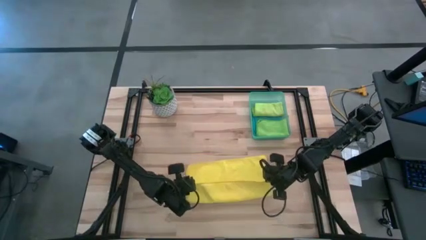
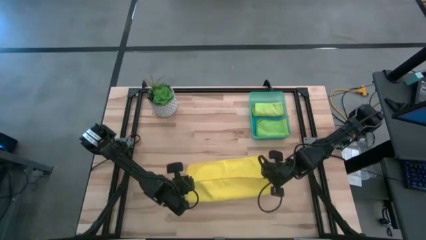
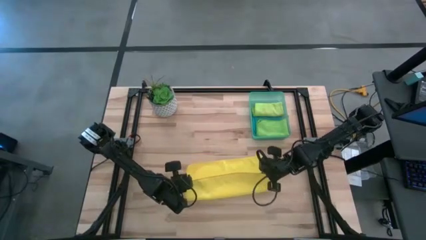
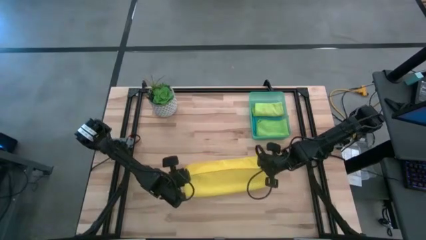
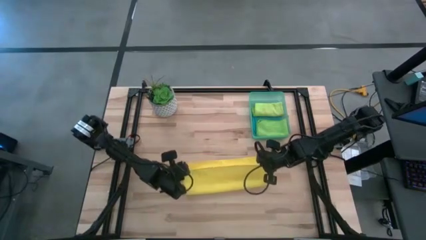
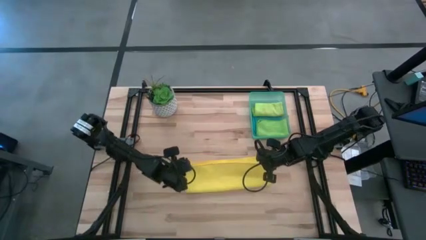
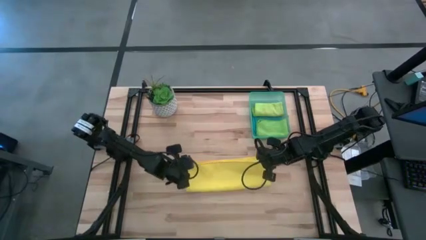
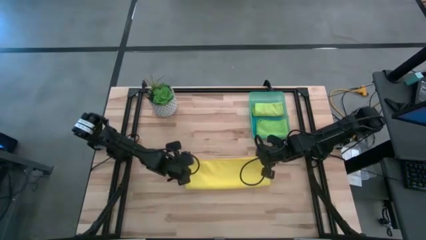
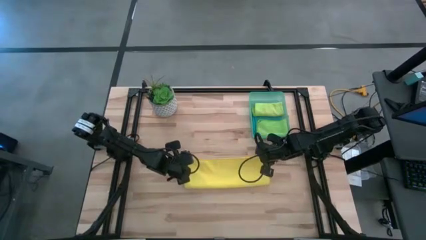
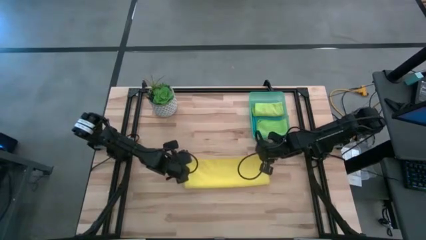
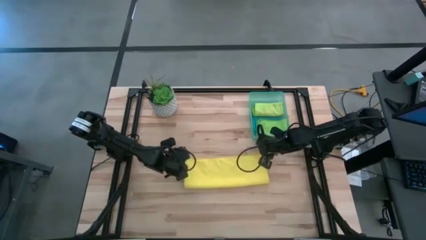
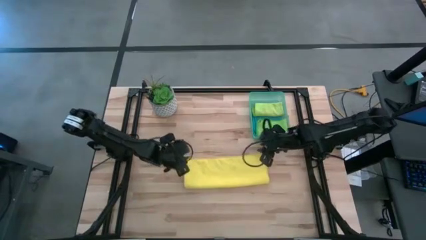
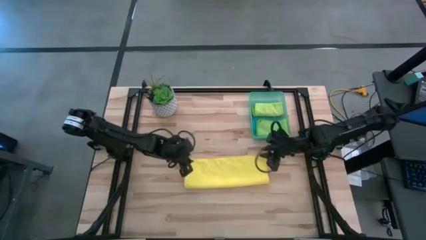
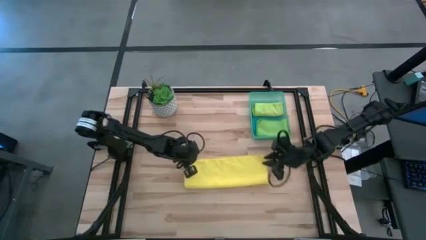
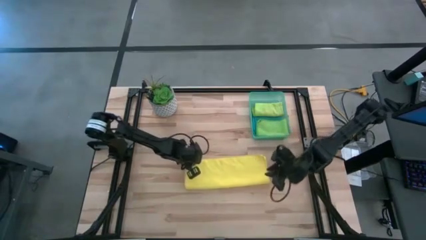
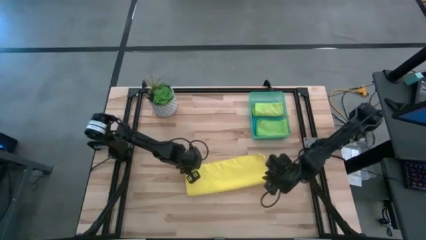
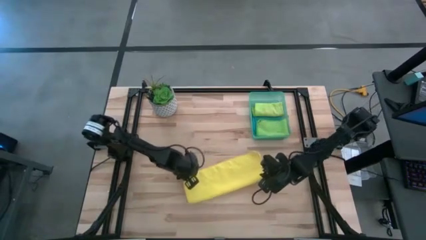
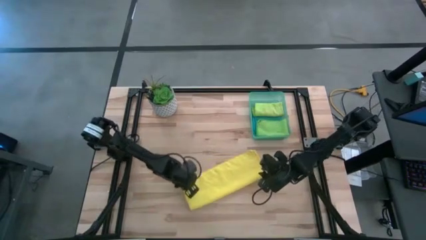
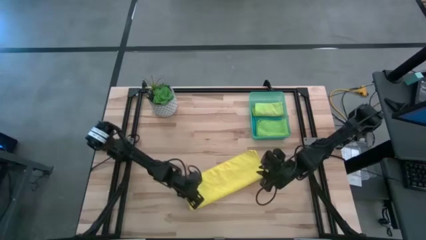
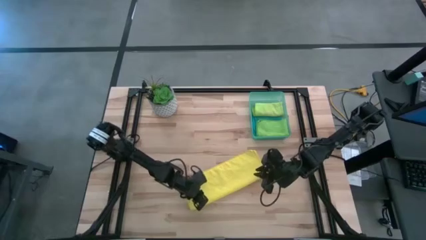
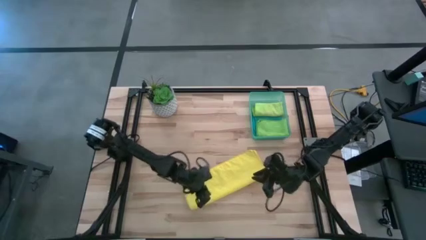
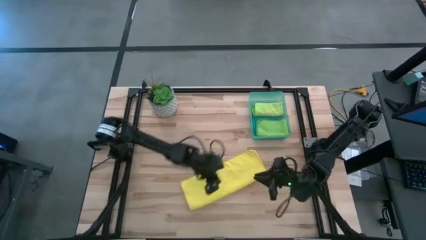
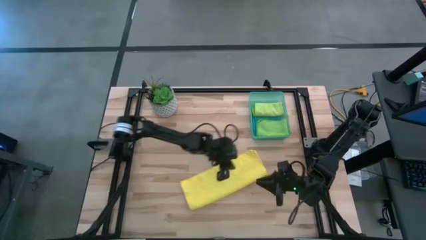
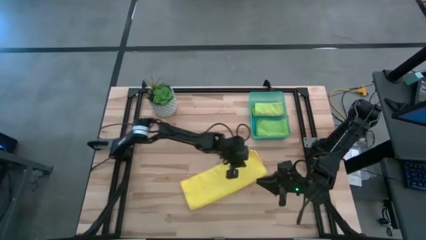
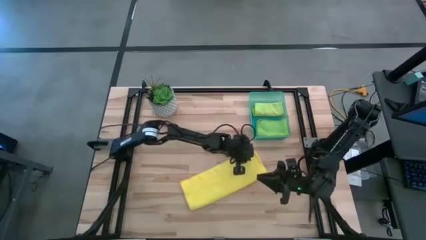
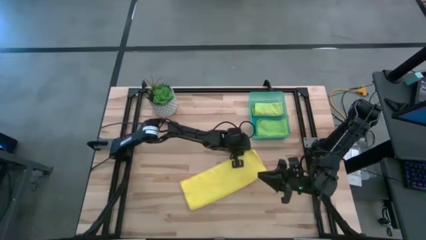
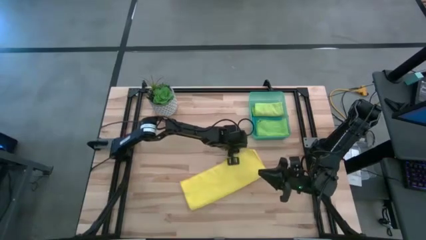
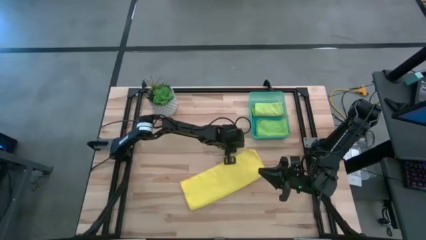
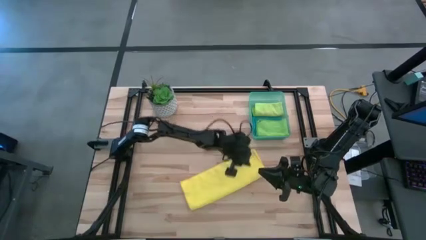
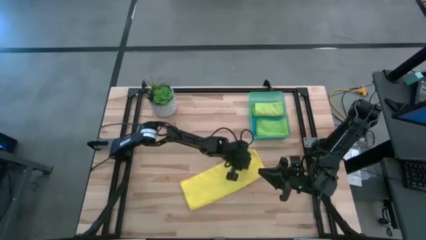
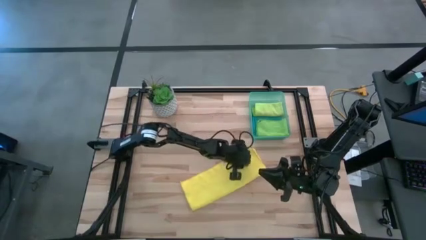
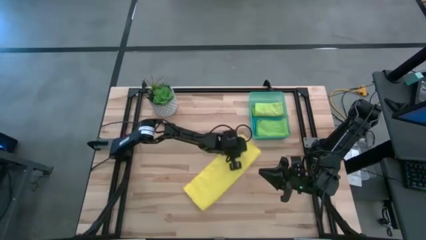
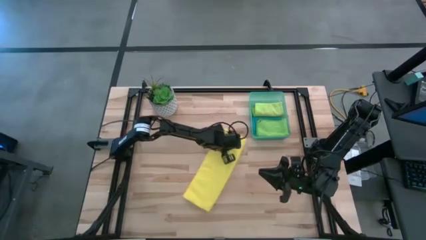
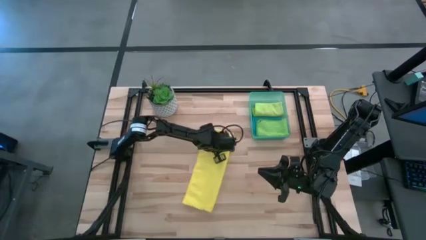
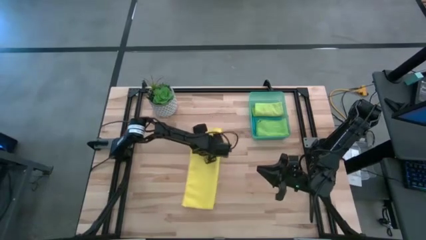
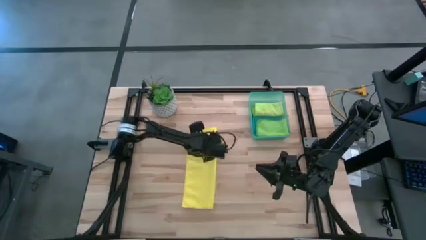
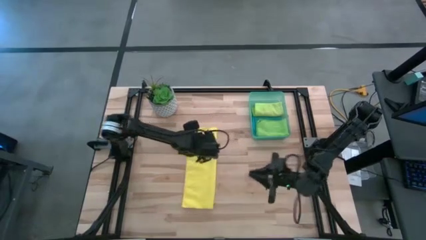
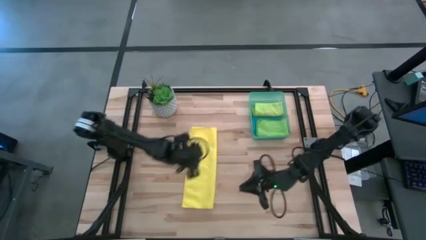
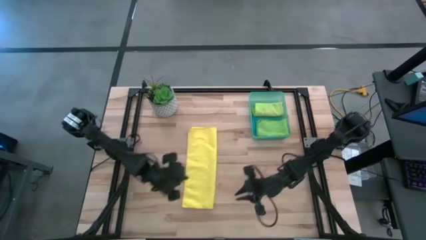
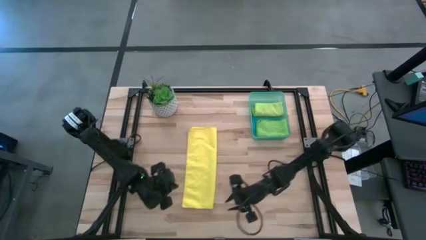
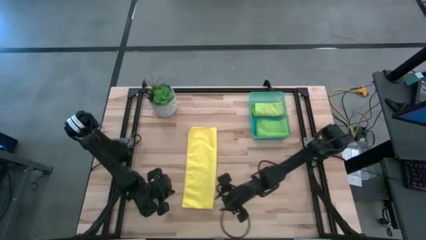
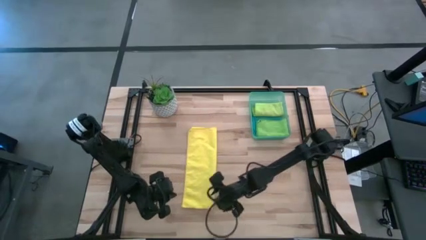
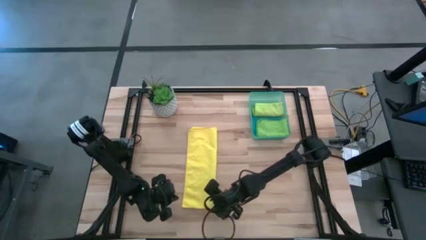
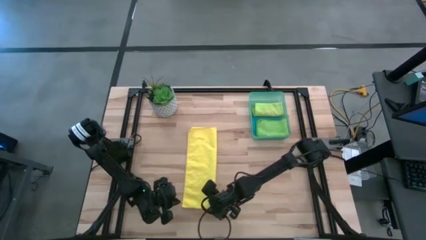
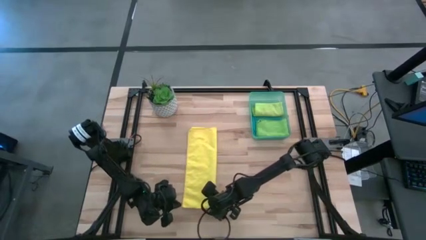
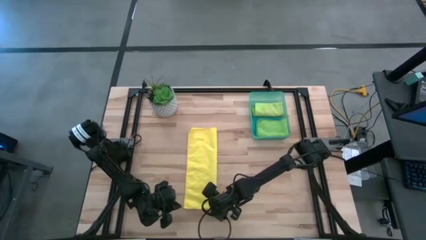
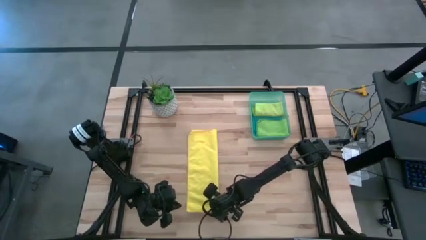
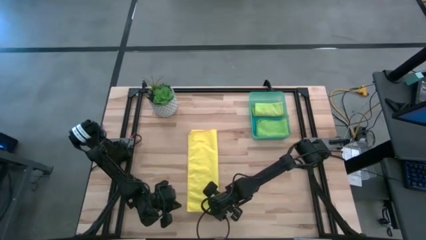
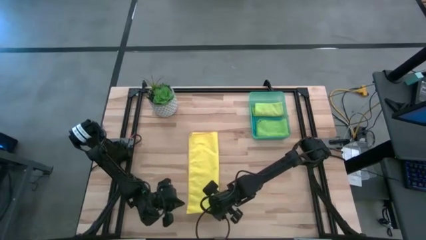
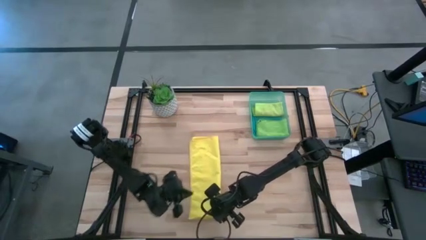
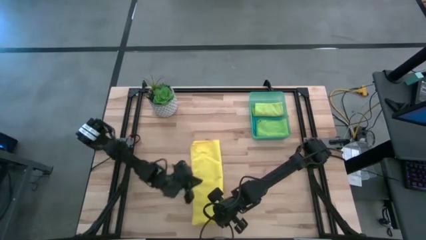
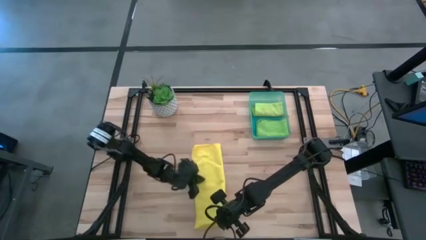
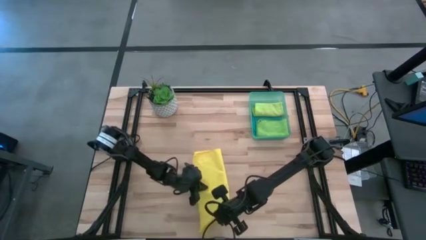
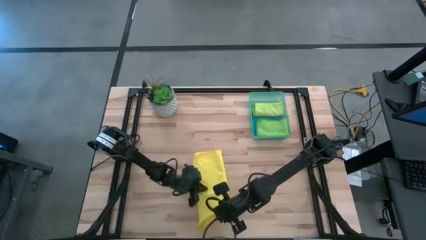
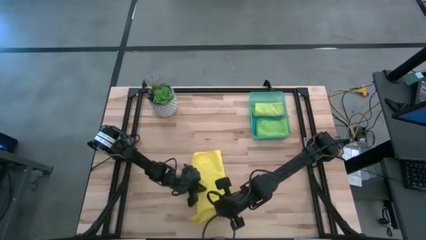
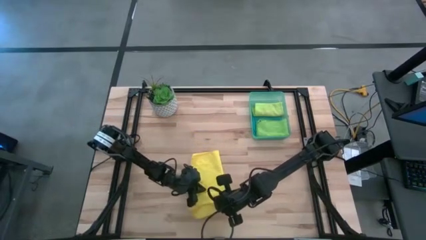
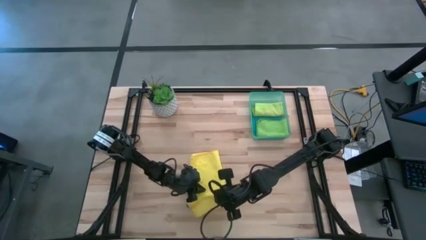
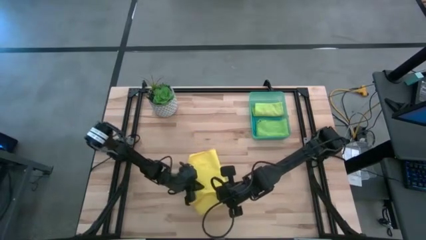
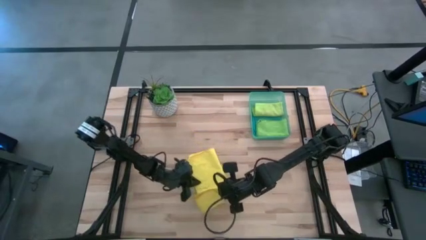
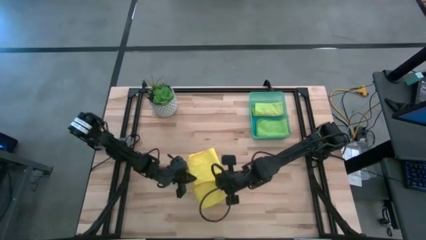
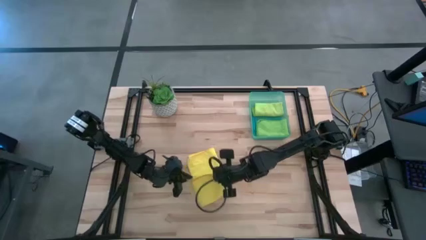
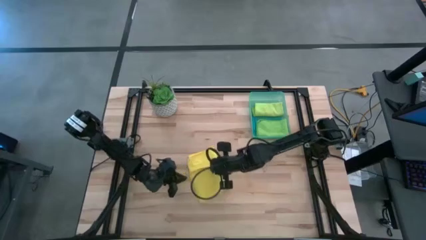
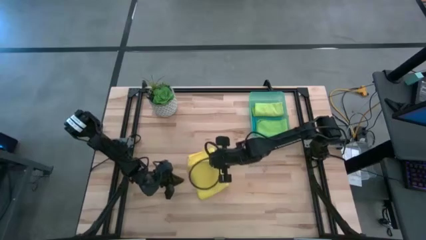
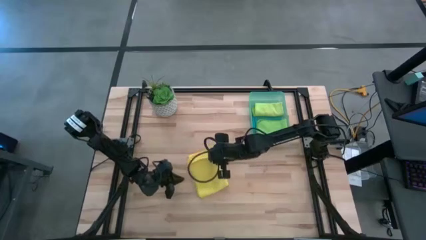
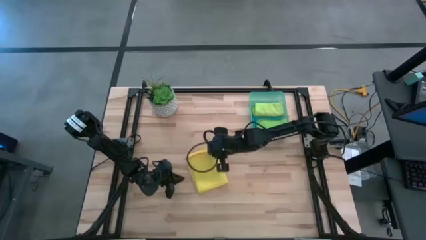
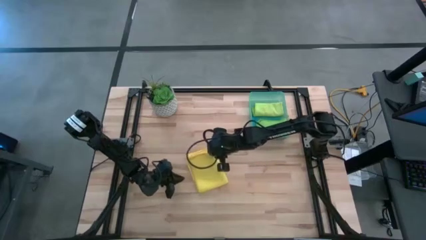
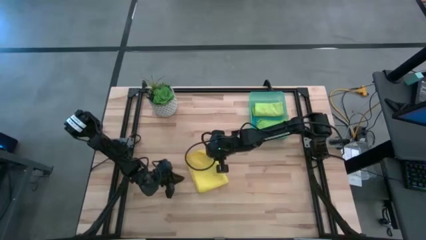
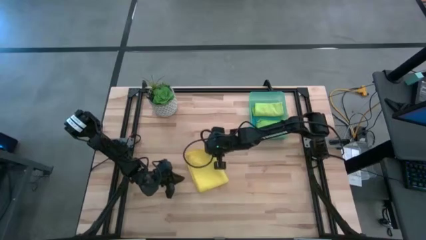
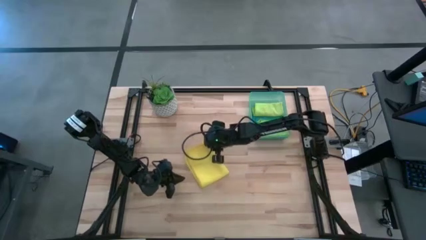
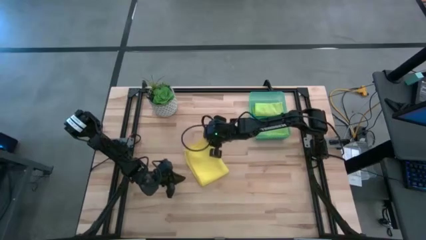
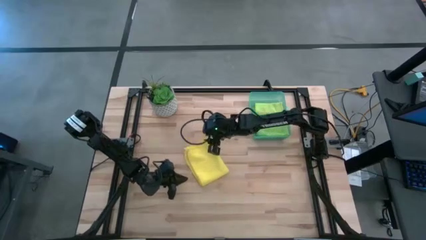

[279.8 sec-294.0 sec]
Task: Fold microfiber towels
Fold the yellow towel
